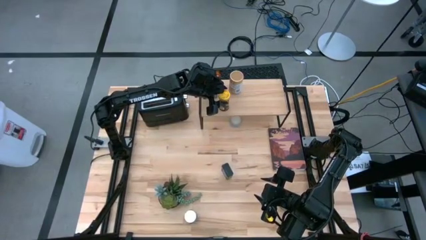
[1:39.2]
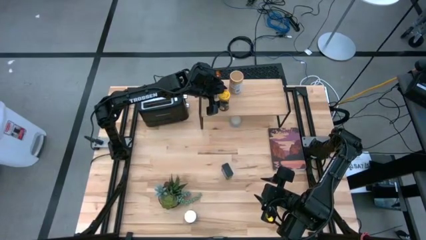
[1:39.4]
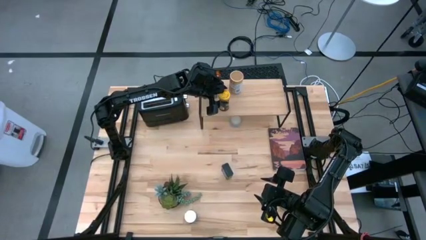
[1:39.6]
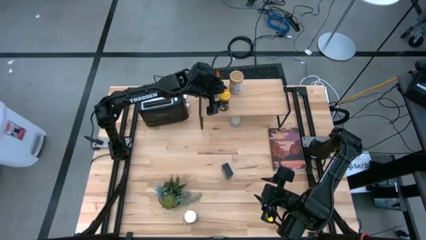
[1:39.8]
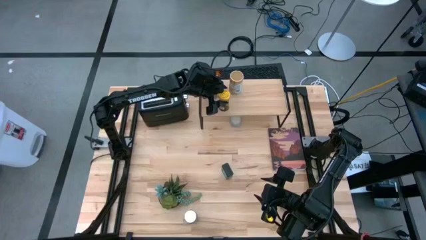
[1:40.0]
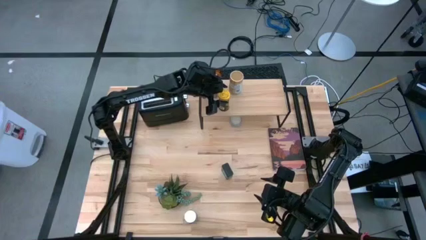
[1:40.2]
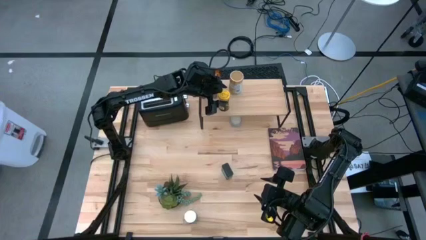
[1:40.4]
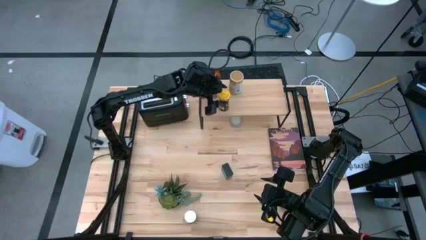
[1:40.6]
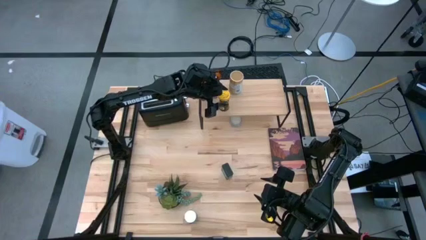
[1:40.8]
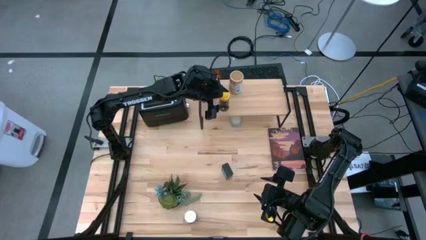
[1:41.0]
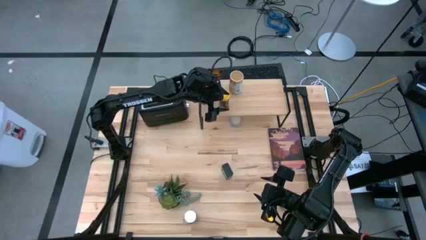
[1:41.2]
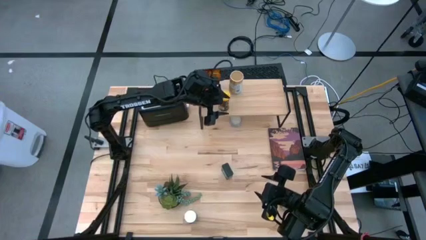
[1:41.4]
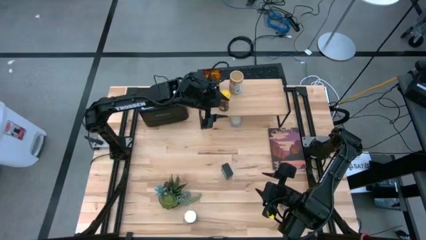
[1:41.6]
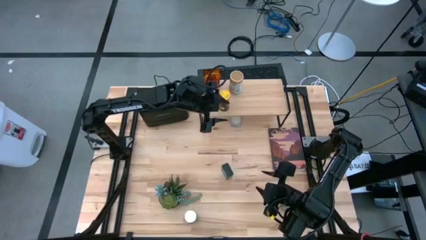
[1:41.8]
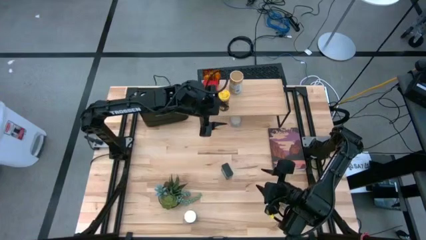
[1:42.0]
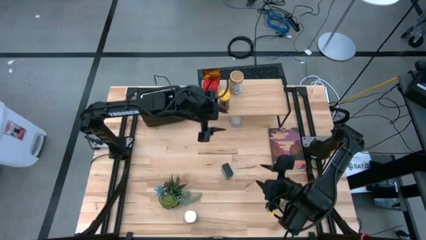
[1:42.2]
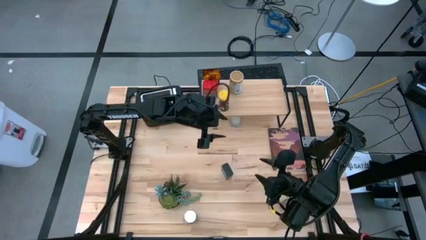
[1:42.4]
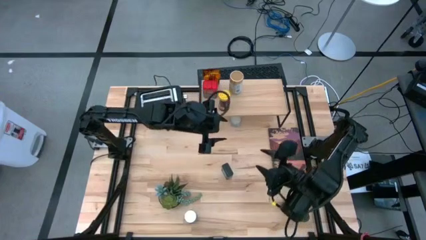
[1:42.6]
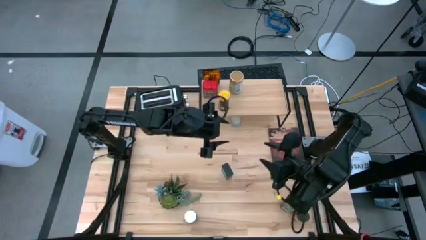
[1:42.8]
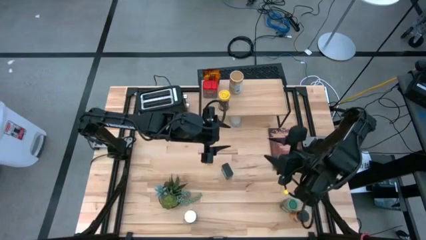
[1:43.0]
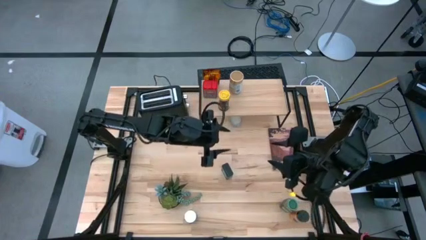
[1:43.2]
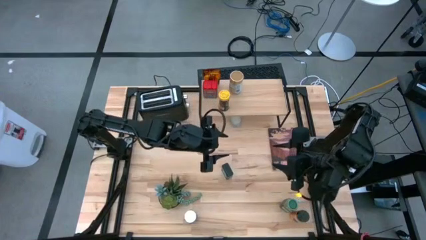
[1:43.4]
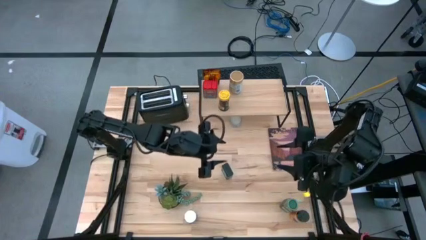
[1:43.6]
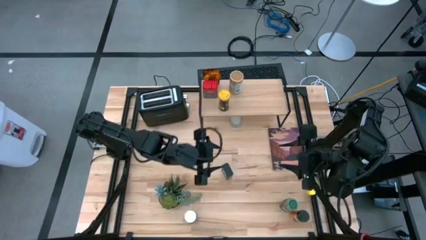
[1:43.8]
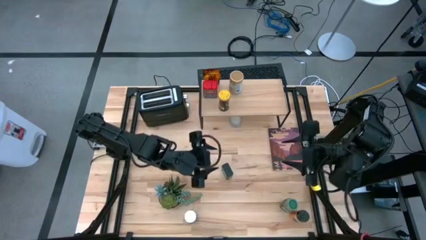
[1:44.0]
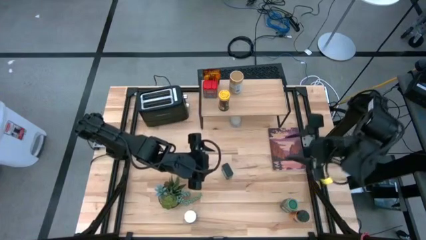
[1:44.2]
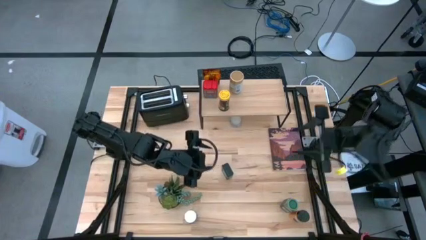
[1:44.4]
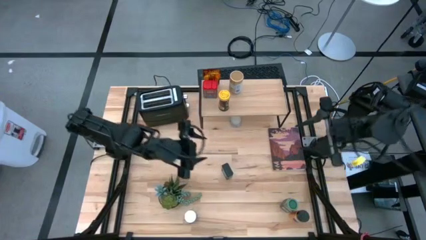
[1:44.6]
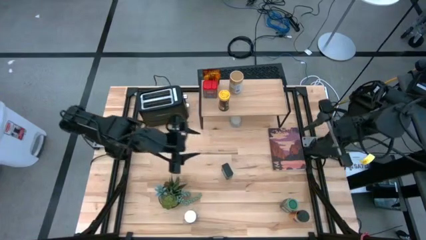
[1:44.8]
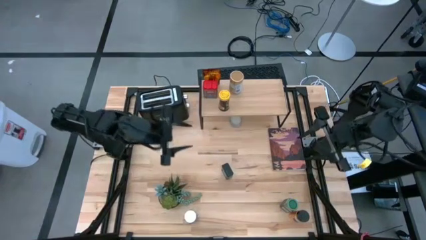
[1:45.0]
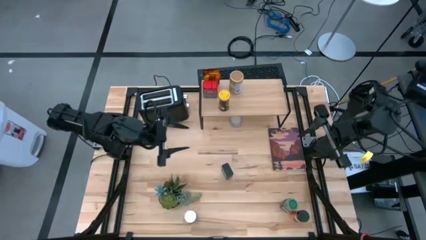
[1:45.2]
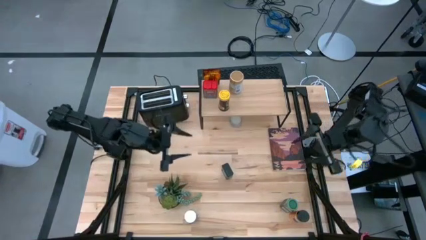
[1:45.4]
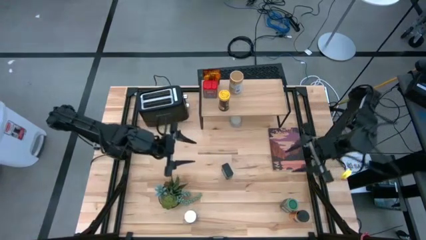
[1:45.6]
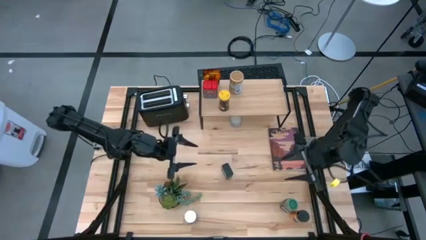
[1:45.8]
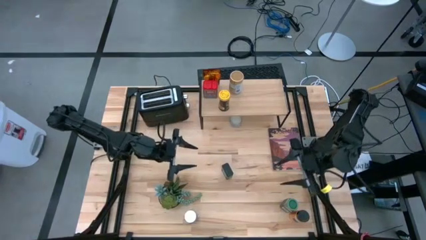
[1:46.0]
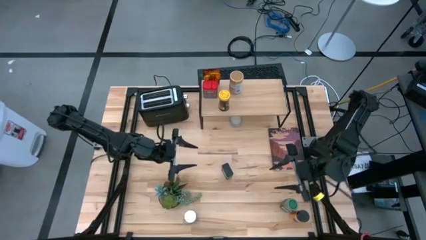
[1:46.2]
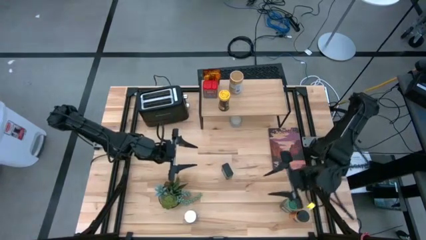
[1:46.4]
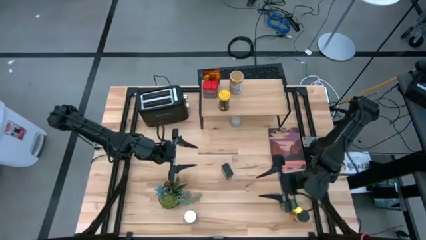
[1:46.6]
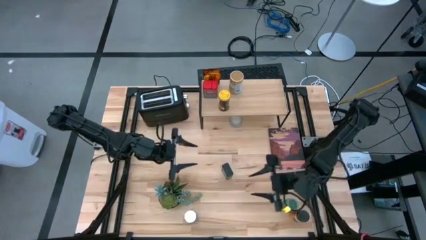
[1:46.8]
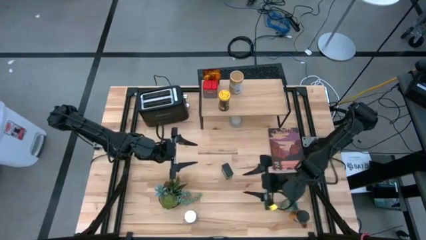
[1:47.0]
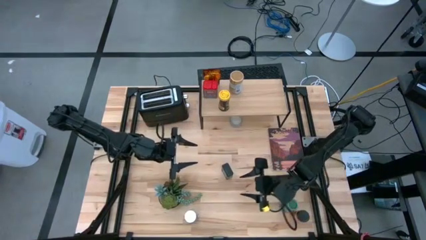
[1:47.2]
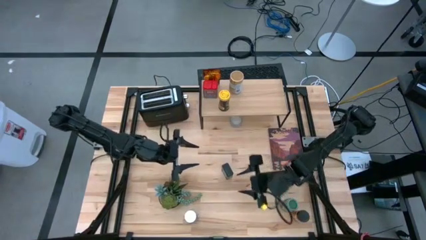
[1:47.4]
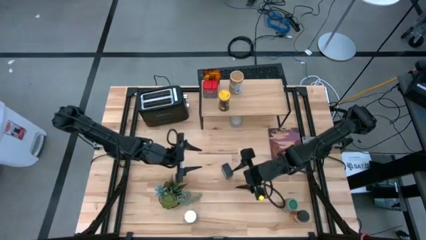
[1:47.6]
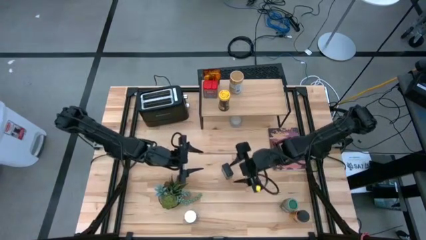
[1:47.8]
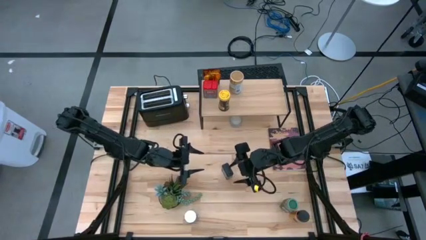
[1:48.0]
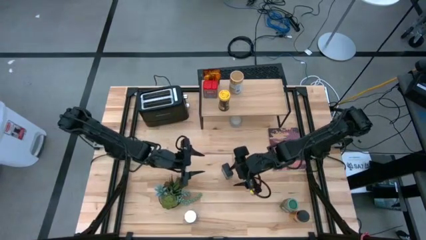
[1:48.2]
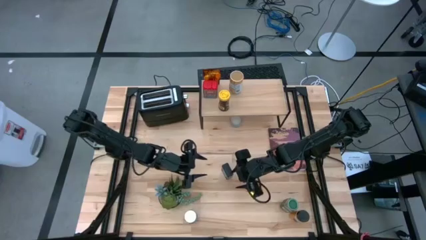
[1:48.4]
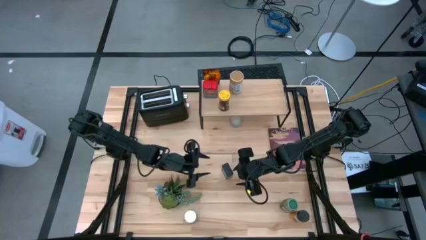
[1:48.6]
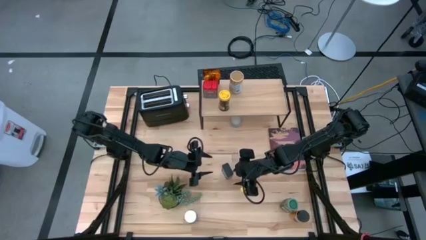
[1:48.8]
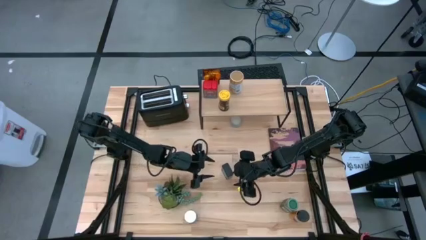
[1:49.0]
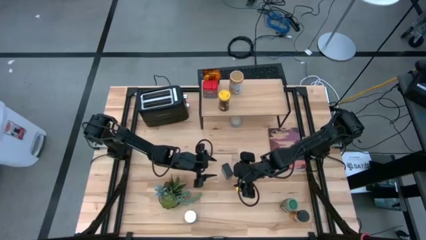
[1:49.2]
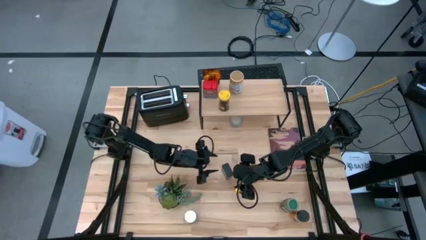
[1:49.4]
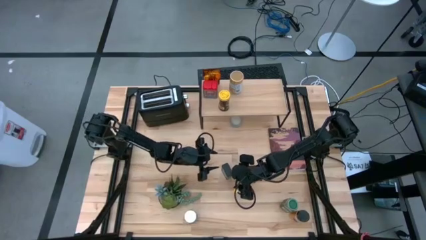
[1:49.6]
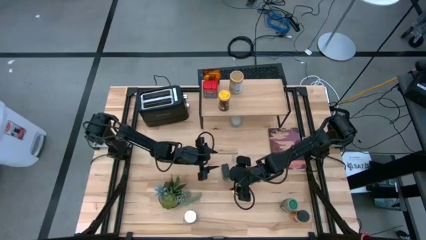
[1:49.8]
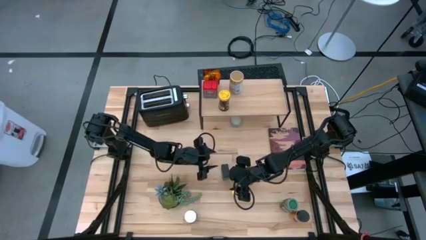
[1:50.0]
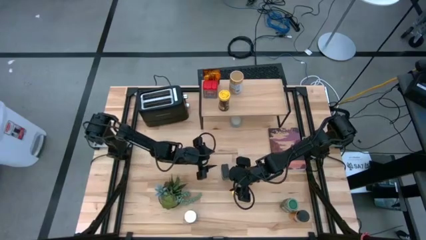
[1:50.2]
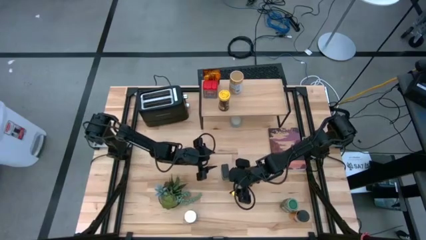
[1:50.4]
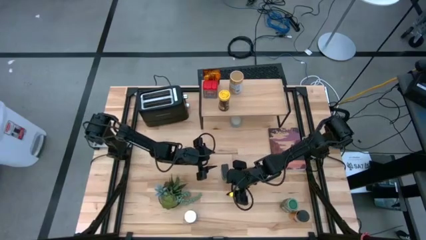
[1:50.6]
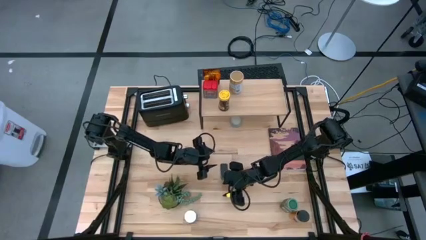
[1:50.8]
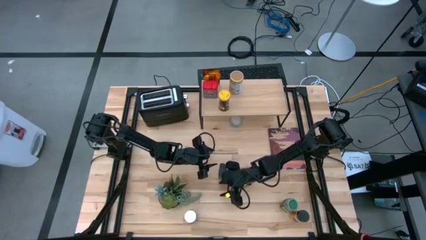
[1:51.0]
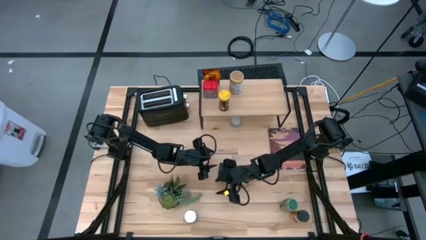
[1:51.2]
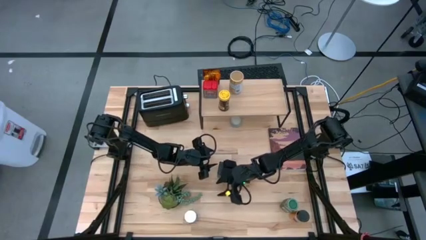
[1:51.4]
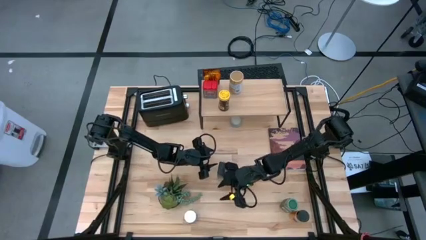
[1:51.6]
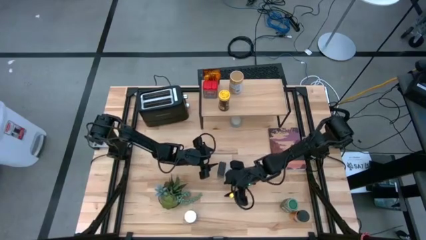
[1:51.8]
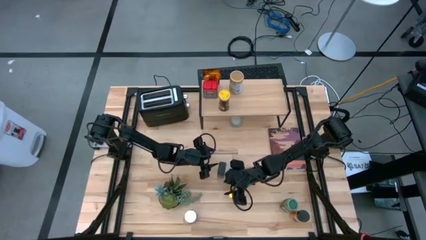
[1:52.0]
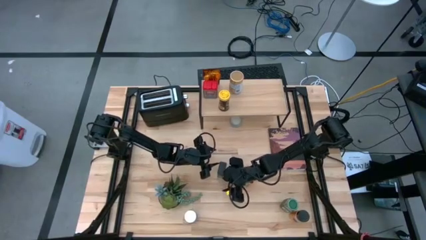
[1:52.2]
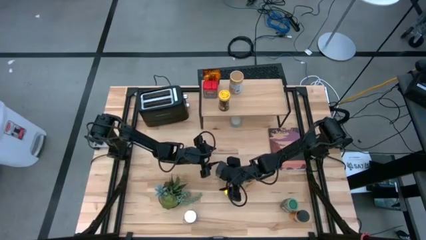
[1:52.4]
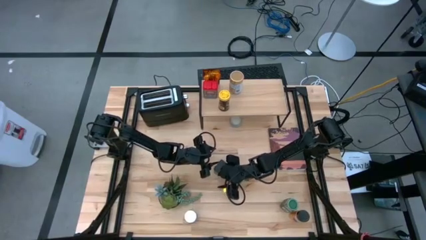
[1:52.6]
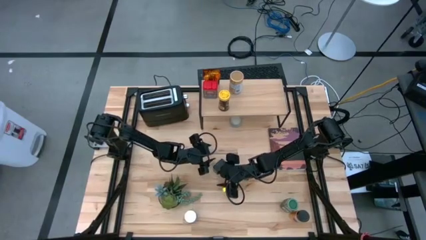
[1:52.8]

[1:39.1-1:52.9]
Task: Shelf spices
Put the black seasoning can on the shelf

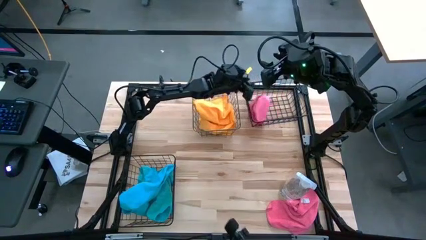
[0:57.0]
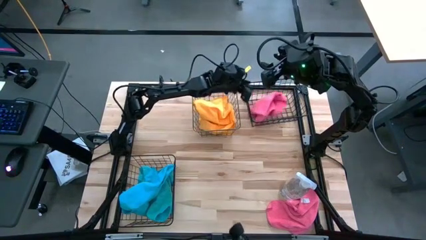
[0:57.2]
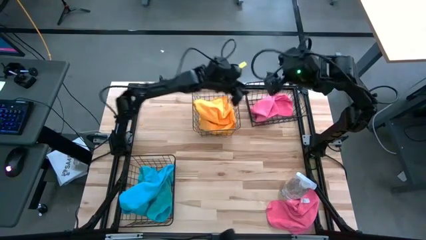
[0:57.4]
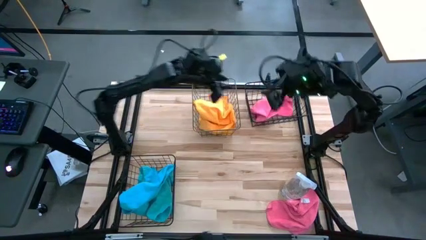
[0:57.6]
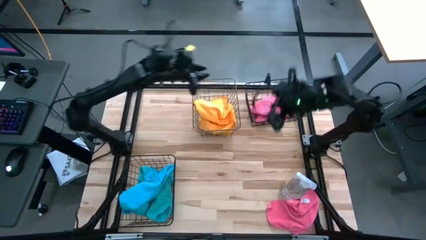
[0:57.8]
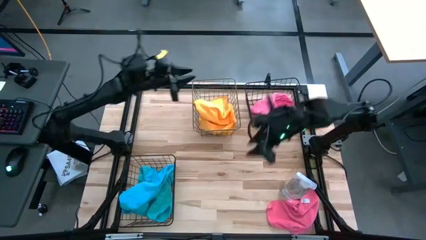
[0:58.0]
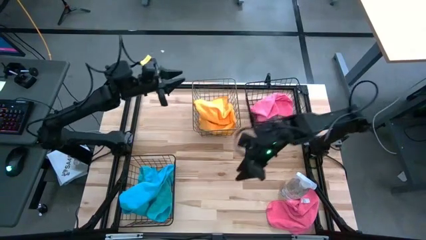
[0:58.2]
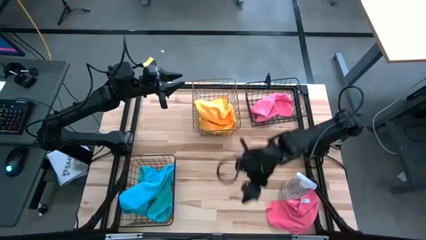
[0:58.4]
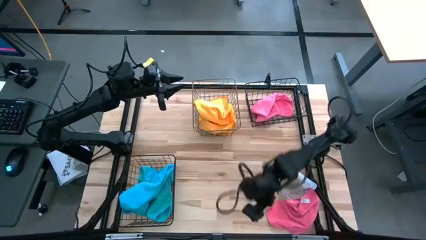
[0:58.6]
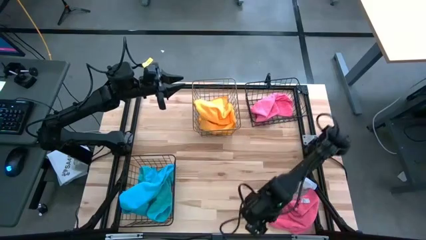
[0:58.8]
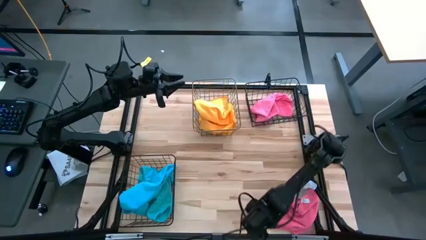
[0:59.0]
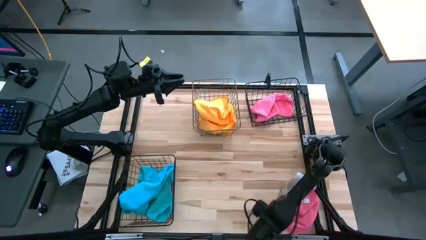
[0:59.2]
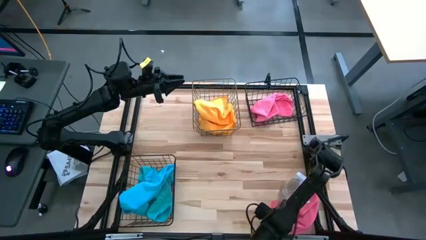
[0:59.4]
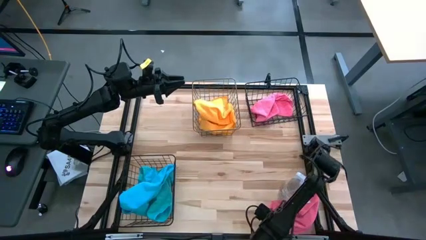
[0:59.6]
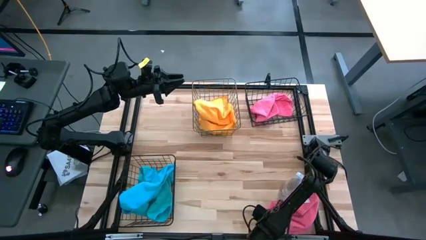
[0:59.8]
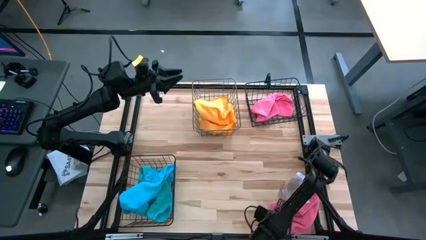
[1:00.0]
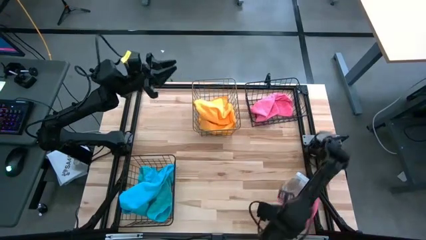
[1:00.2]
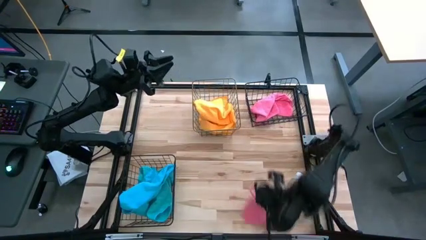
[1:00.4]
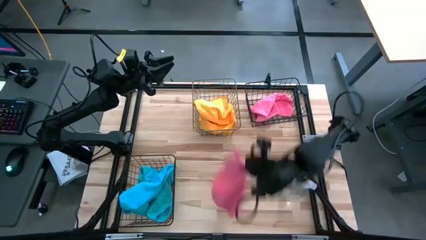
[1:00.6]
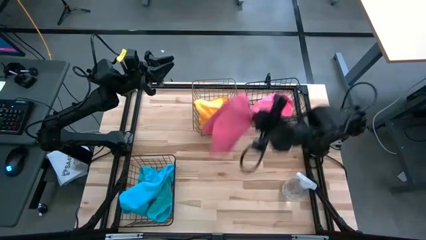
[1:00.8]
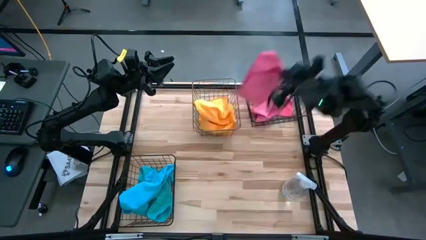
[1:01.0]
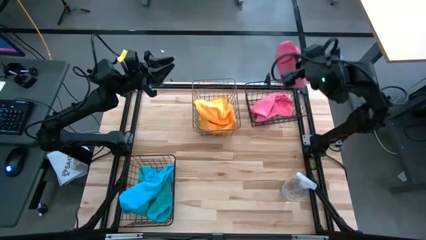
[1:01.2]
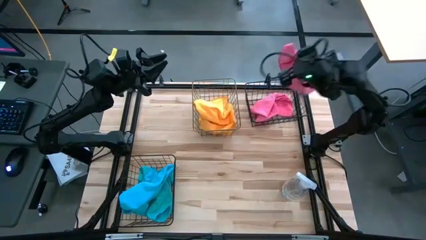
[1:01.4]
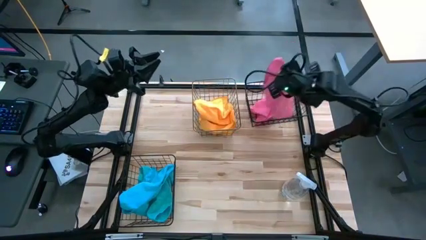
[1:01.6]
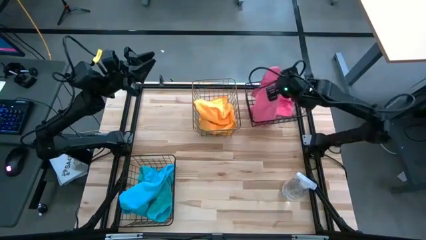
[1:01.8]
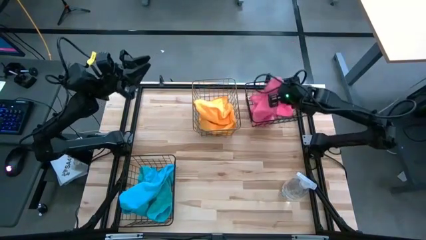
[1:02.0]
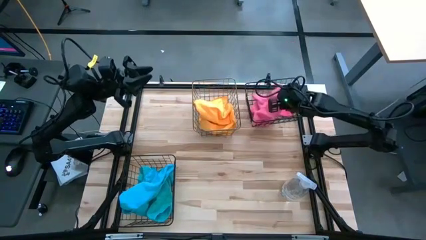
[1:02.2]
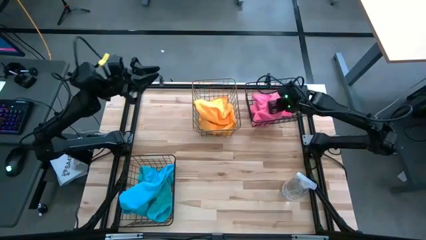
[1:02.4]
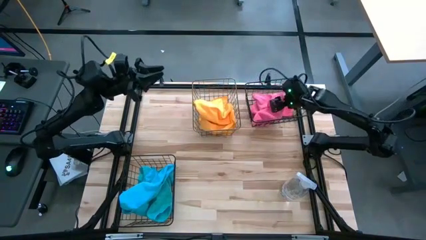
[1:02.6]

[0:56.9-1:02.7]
Task: Sort microfiber towel by color & place in baskets
Put the pink towel into the top black wire basket
